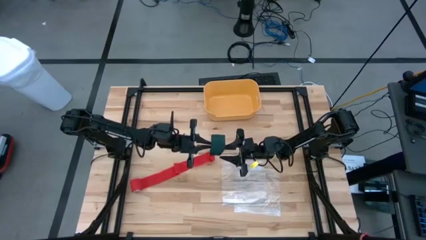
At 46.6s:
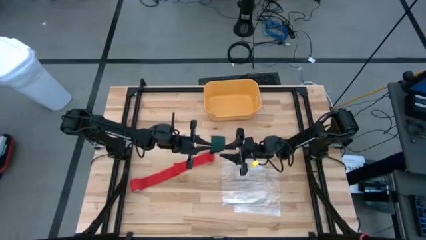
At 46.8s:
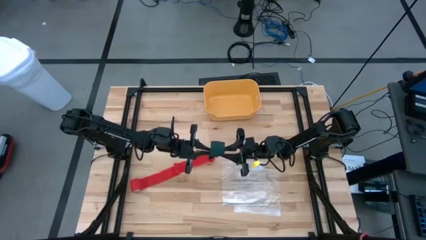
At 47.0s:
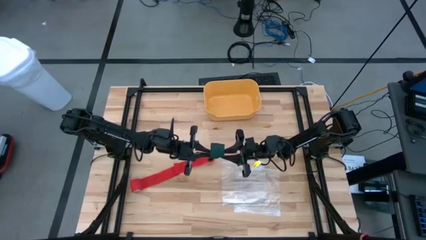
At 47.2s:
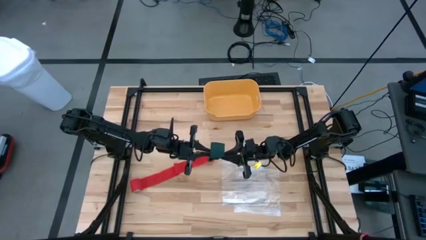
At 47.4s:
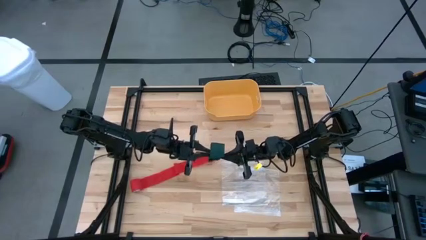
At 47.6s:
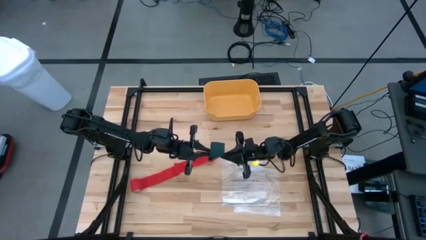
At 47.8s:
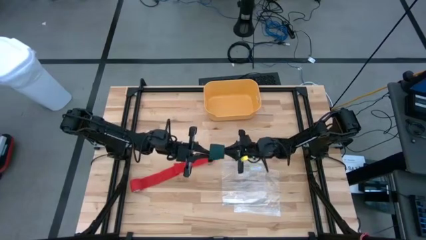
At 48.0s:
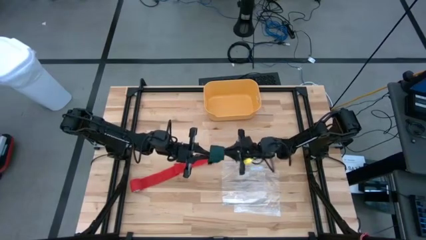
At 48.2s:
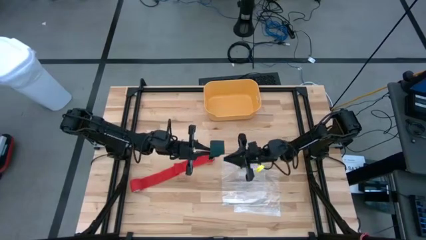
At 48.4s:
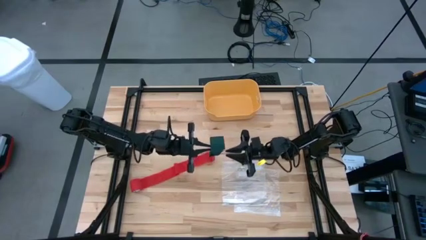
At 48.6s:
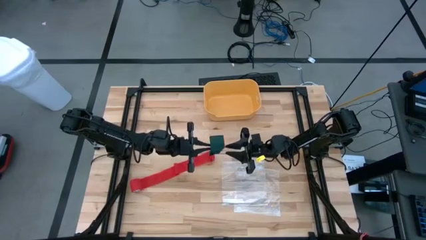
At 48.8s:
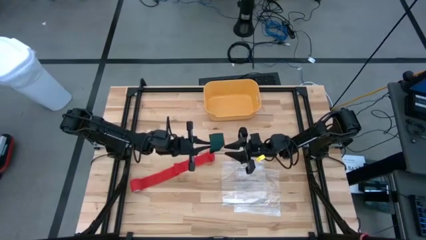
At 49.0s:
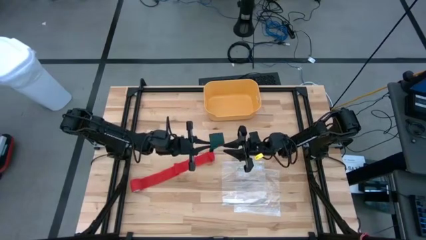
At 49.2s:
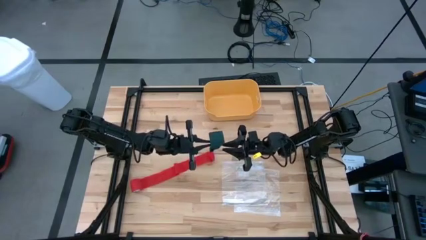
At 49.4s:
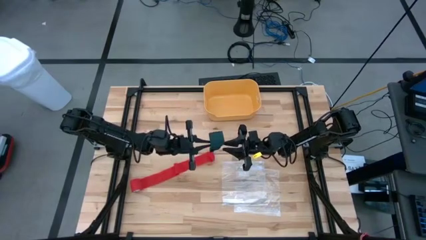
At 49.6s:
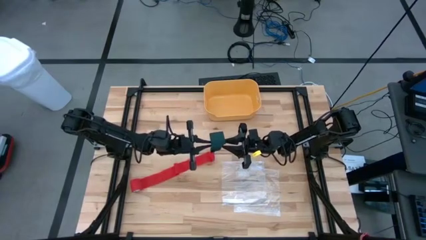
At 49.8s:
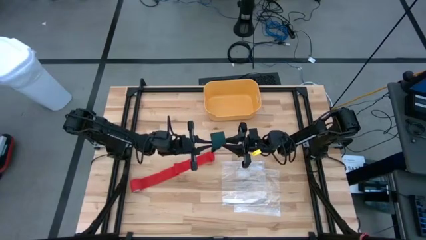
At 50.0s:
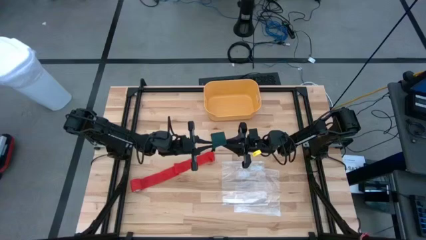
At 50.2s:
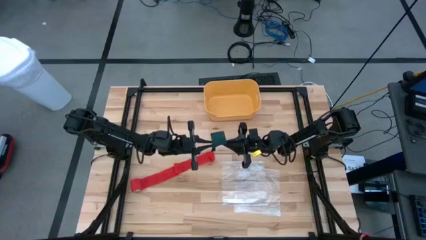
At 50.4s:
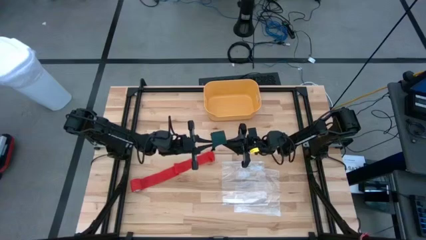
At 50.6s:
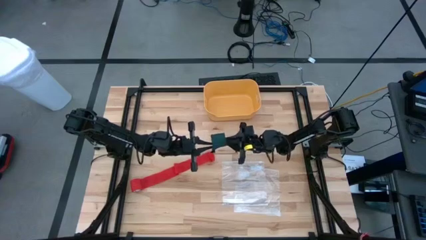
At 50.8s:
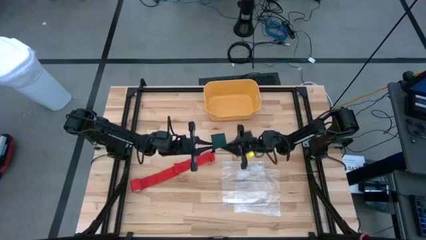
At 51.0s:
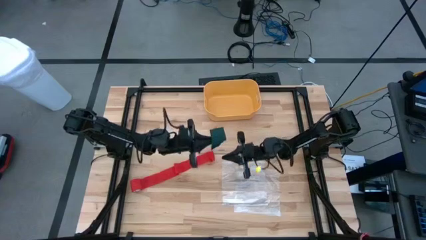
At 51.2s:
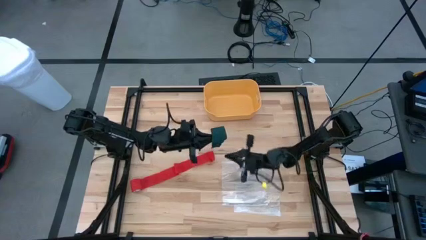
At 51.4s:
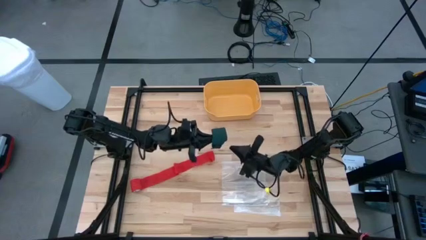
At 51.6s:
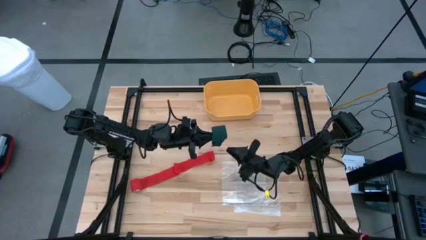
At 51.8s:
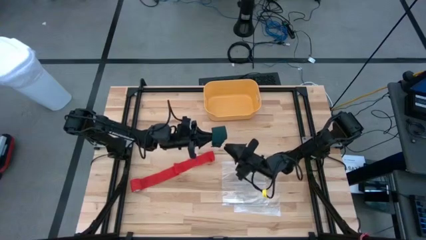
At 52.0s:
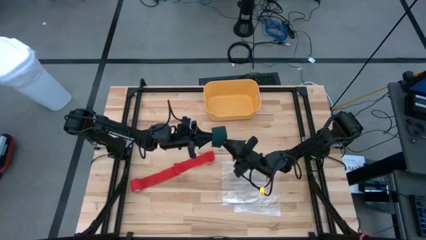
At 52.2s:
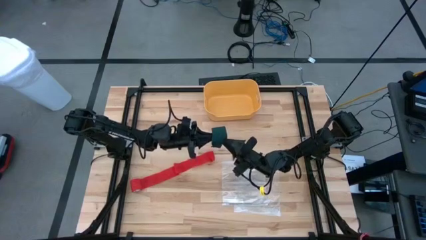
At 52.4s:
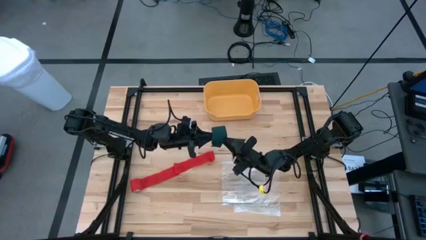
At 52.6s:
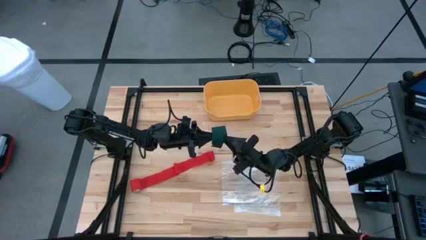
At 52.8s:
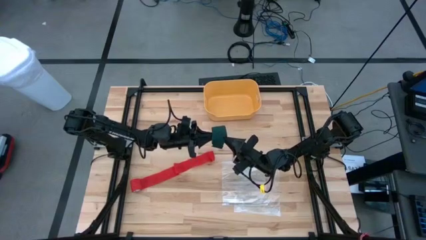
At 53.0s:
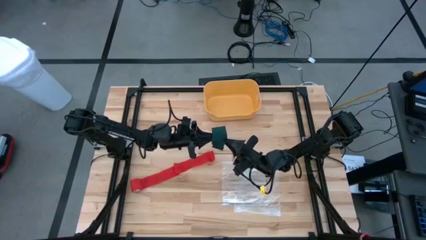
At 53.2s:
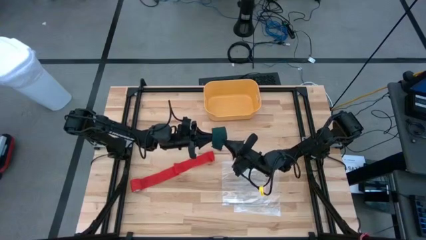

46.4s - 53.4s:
Task: Roll bandage
Roll the green bandage
